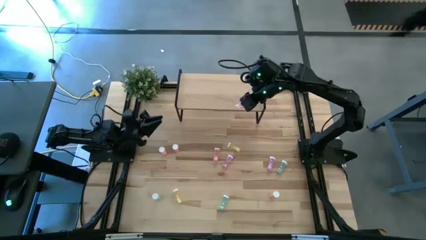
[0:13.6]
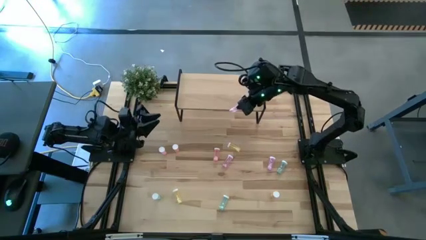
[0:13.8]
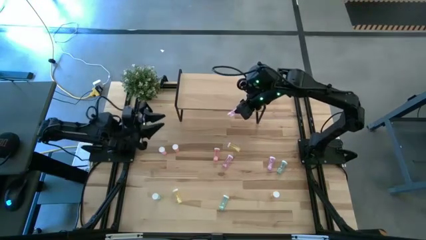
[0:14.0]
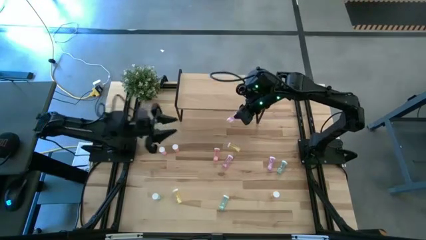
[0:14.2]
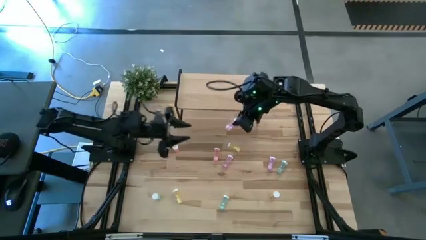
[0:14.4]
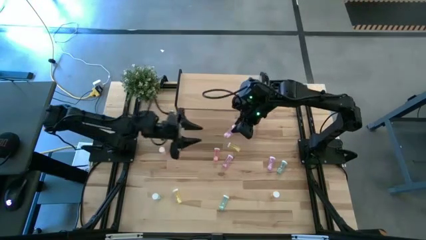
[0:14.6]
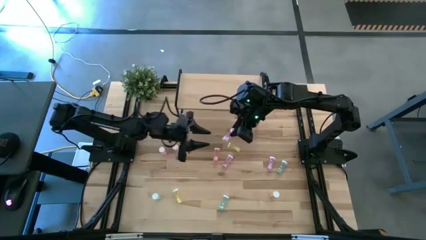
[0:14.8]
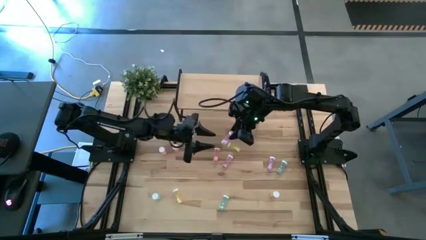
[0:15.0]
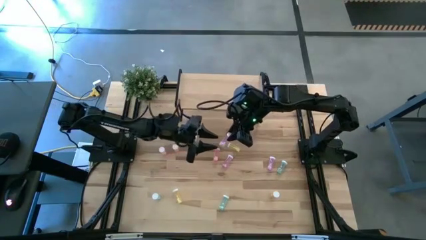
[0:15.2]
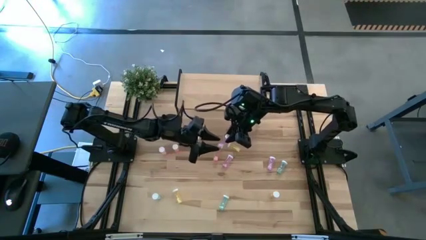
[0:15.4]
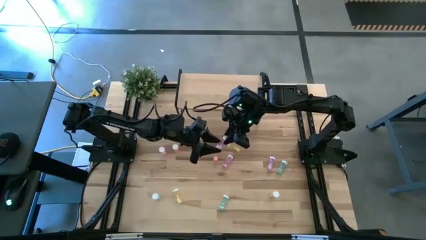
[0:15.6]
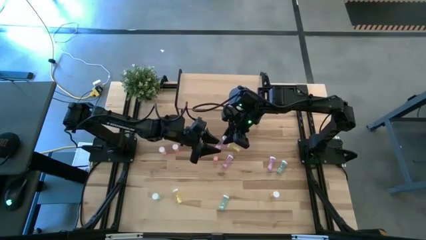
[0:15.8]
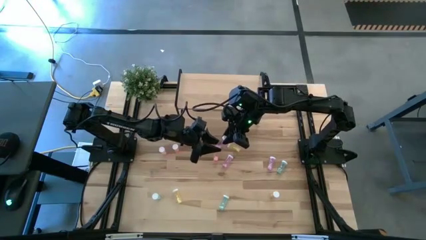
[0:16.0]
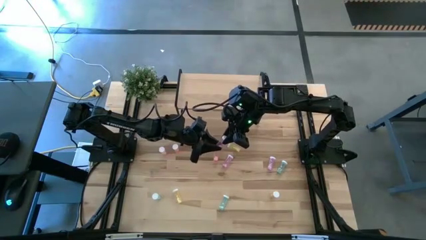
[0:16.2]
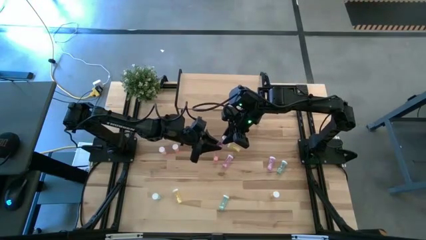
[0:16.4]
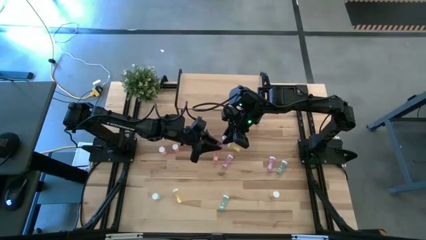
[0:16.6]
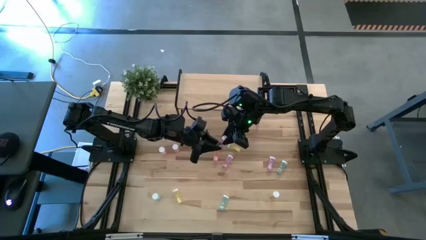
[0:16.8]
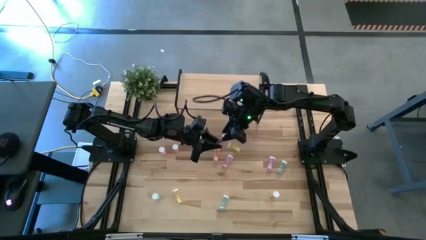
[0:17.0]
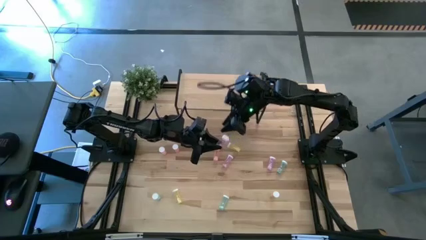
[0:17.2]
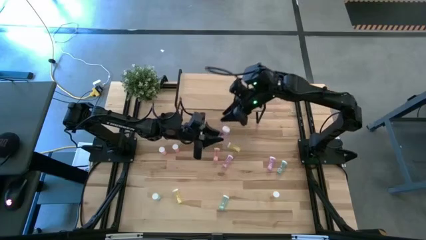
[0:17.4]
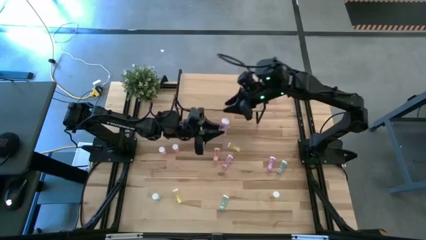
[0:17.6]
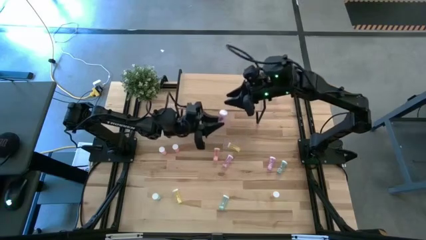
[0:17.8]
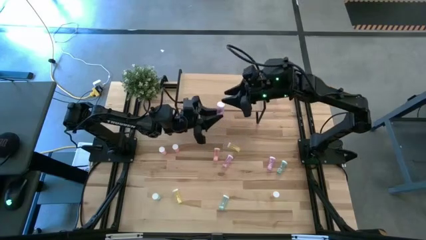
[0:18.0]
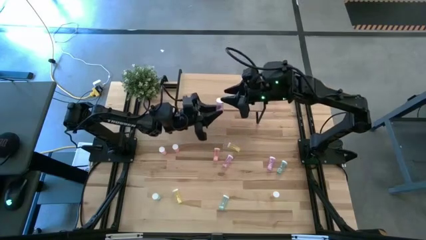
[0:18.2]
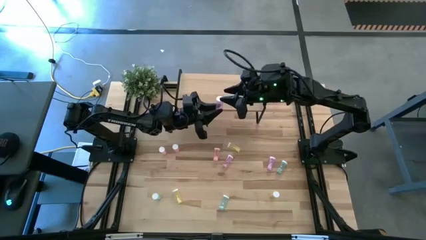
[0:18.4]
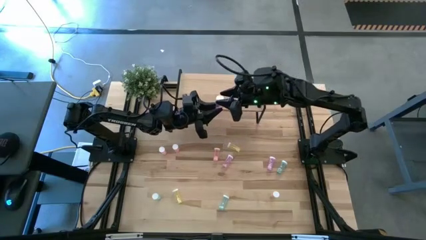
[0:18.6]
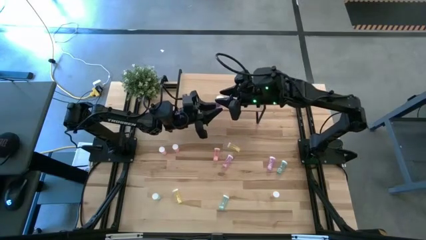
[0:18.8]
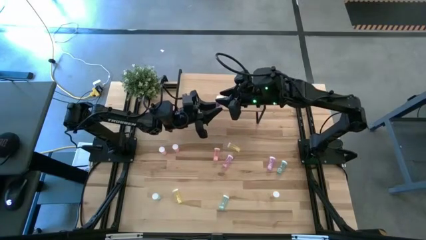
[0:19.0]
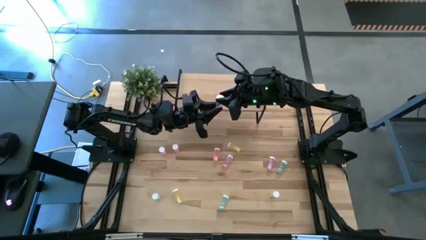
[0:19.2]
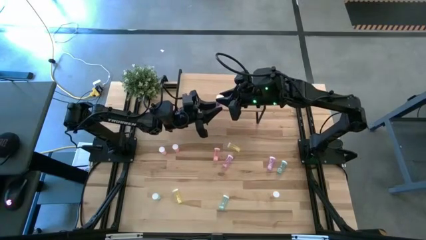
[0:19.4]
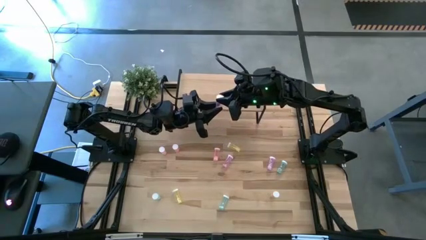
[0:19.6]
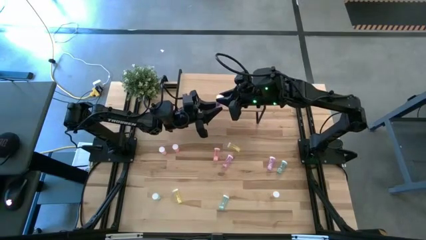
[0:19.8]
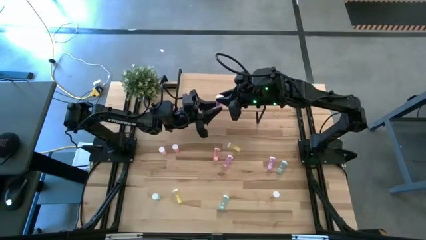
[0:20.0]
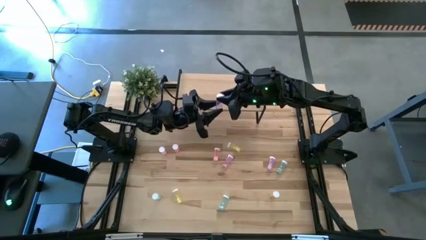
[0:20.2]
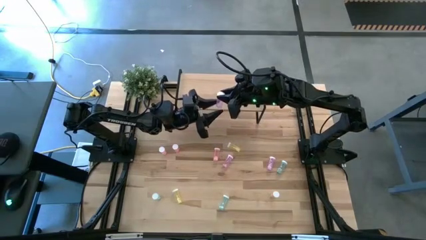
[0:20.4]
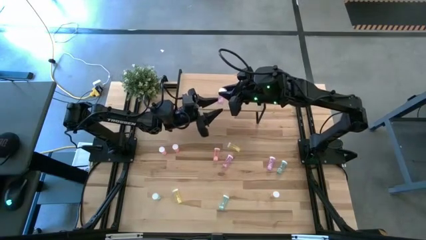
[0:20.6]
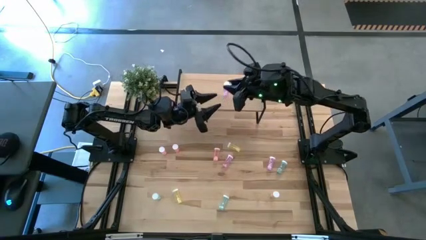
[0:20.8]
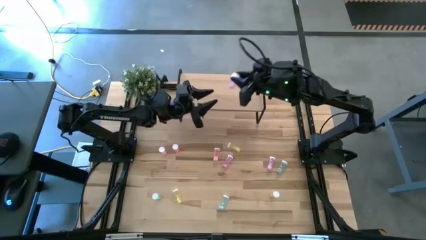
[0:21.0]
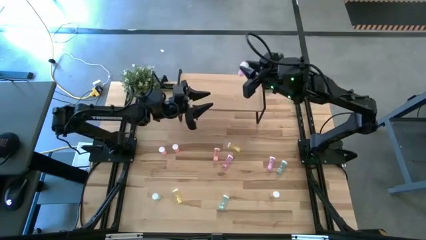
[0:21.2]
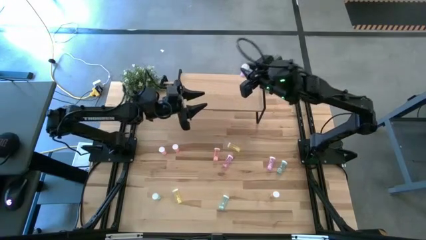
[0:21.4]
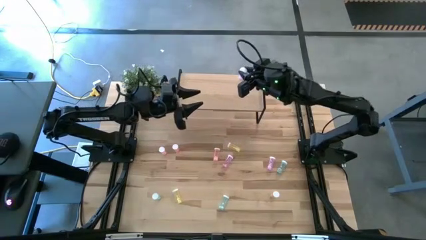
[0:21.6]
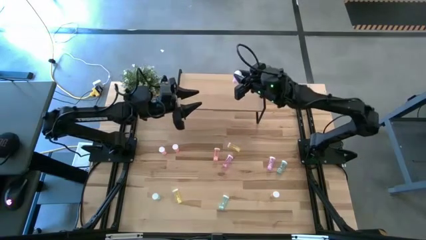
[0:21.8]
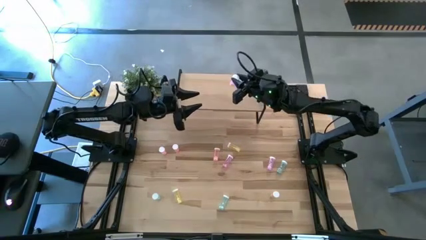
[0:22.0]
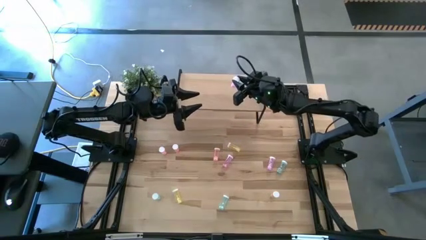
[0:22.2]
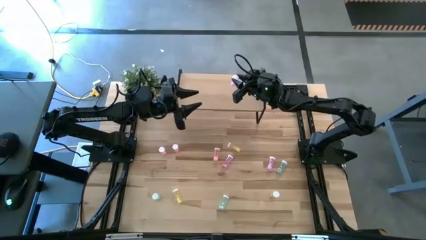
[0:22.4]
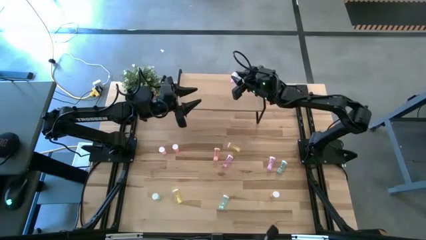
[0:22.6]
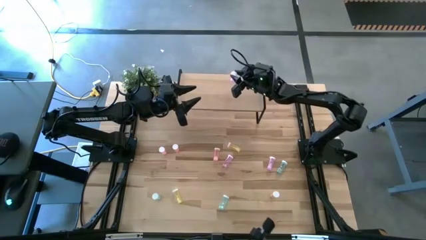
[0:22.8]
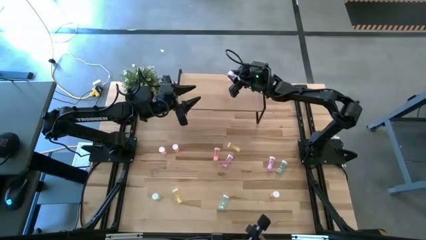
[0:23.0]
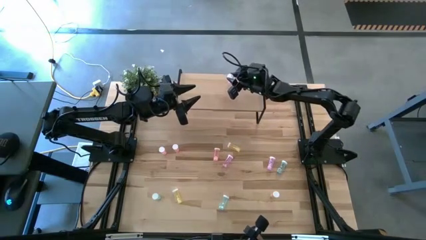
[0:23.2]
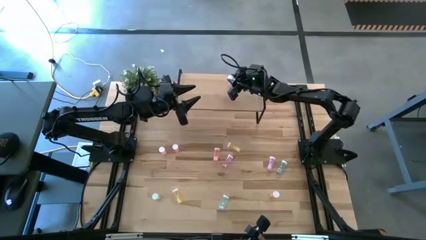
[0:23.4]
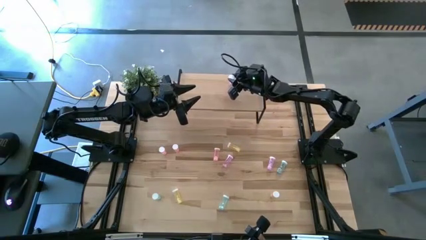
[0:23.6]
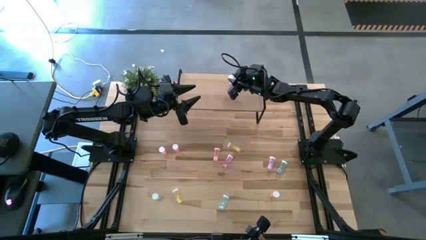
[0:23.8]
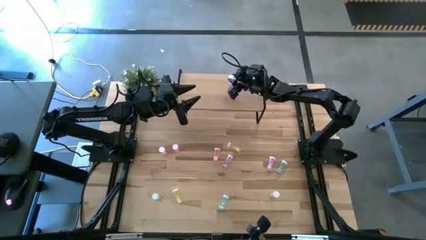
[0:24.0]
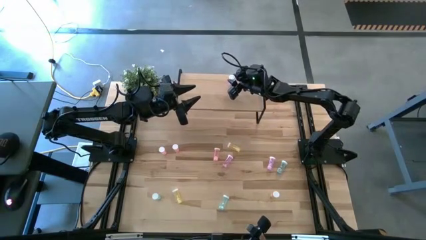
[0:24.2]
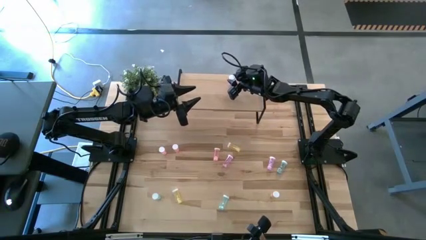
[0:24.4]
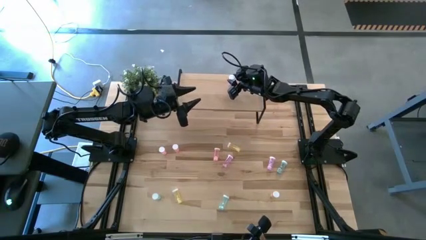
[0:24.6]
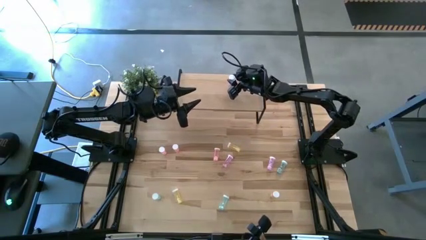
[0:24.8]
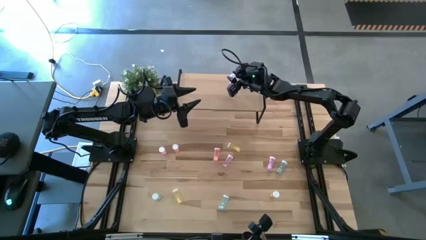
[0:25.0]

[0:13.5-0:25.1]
Task: Pick and place medicine bottles onto shelf by color
Put the top right purple pill bottle on the shelf

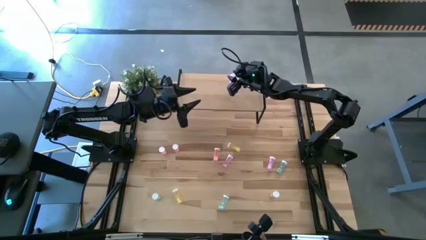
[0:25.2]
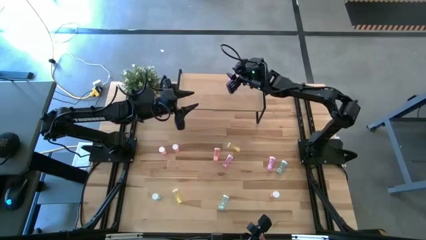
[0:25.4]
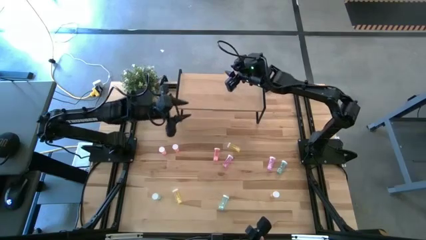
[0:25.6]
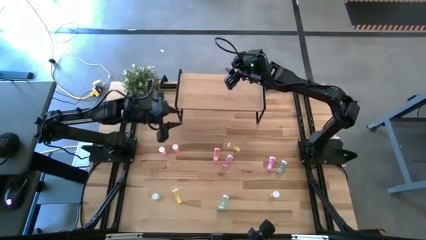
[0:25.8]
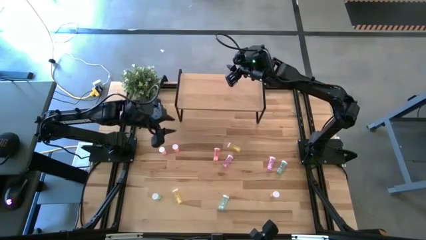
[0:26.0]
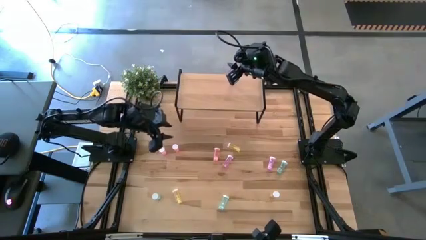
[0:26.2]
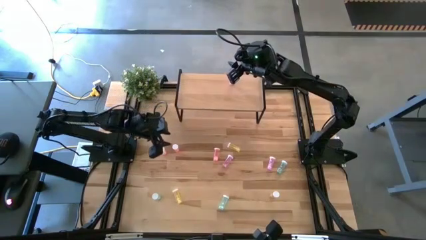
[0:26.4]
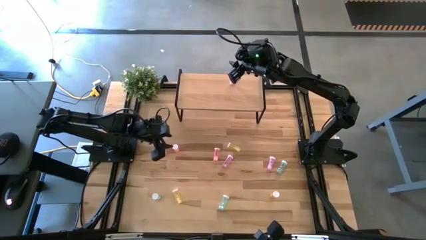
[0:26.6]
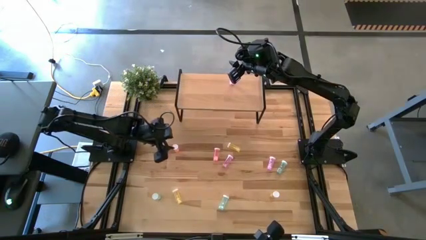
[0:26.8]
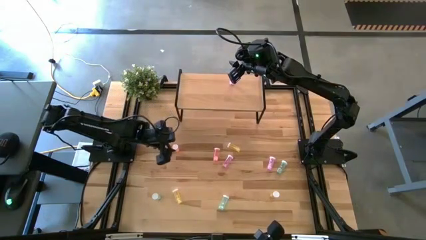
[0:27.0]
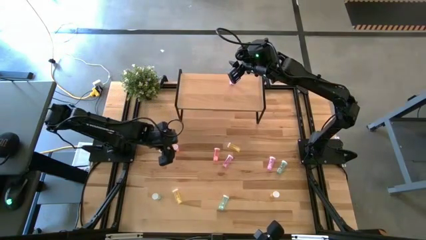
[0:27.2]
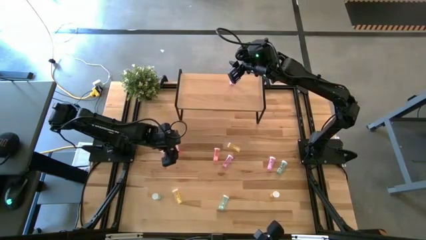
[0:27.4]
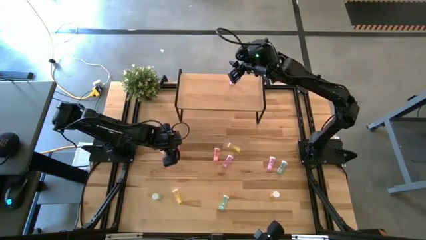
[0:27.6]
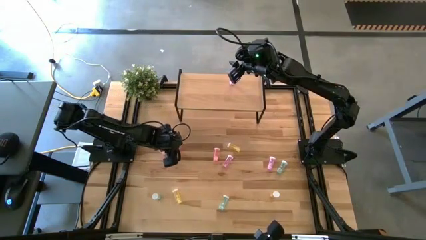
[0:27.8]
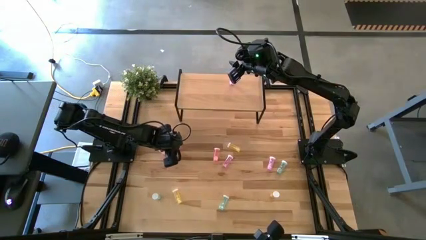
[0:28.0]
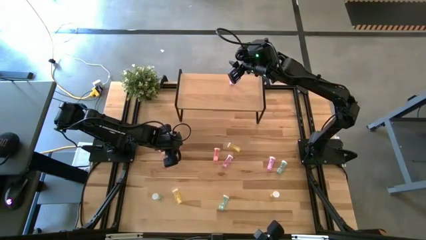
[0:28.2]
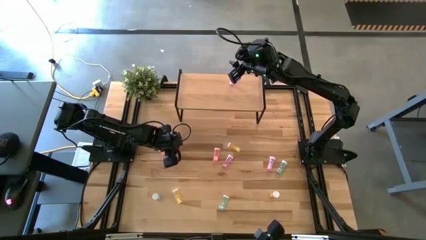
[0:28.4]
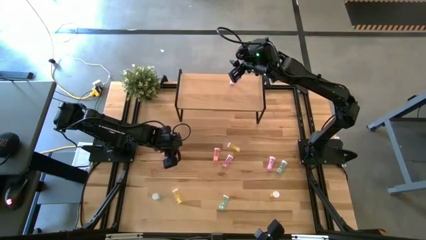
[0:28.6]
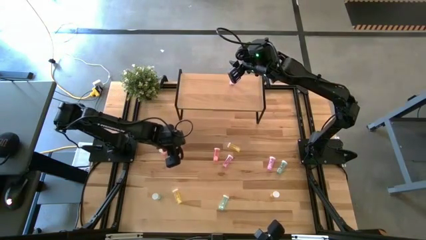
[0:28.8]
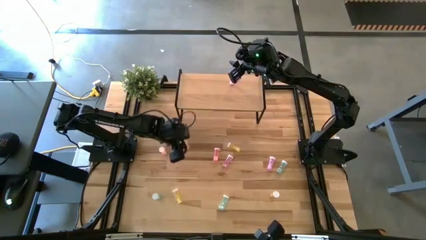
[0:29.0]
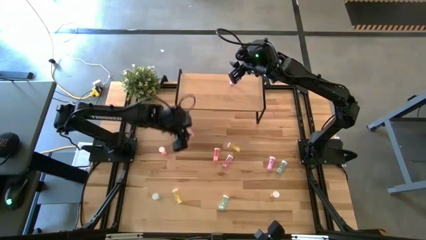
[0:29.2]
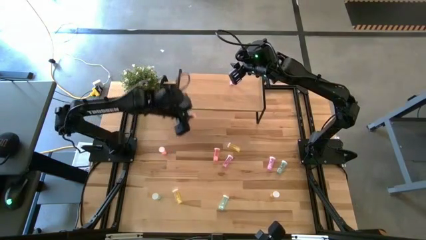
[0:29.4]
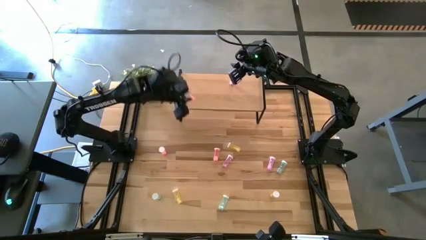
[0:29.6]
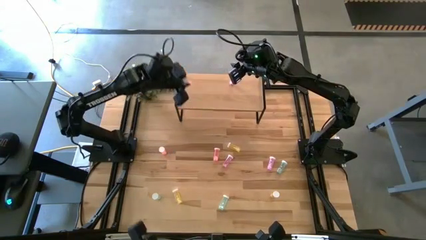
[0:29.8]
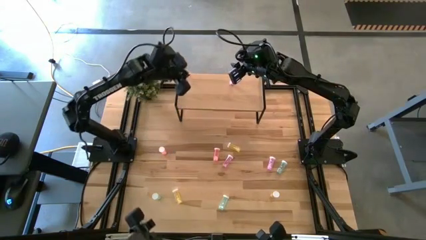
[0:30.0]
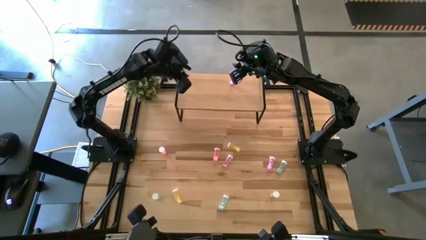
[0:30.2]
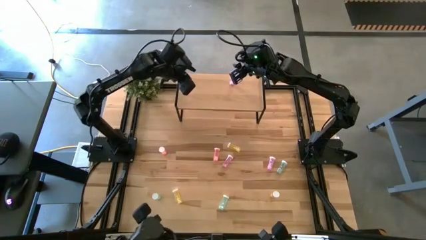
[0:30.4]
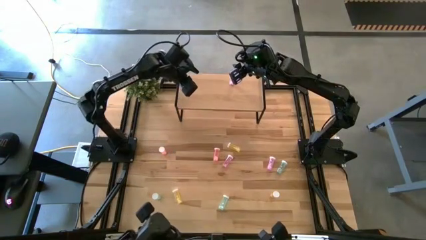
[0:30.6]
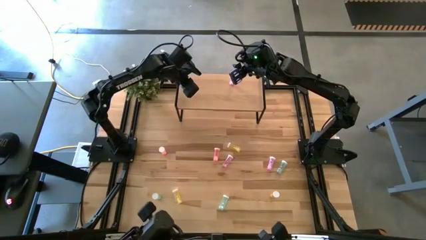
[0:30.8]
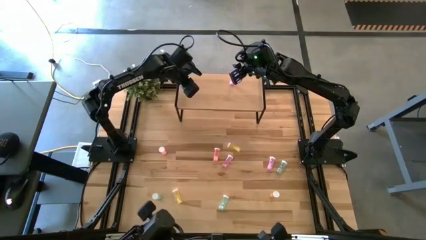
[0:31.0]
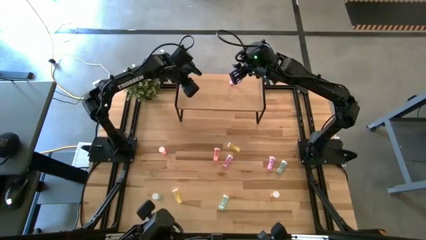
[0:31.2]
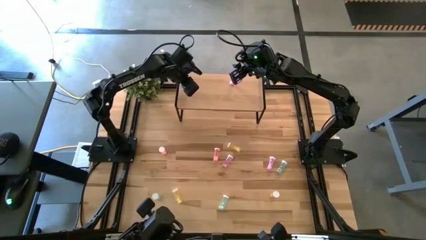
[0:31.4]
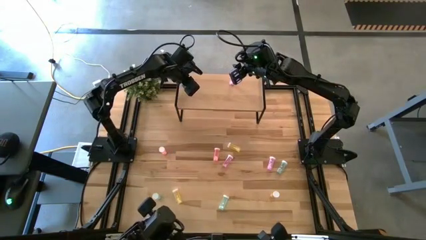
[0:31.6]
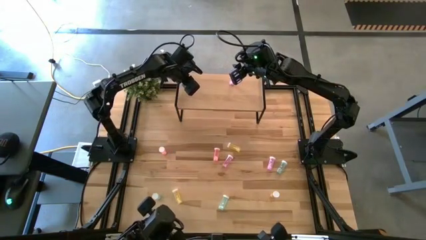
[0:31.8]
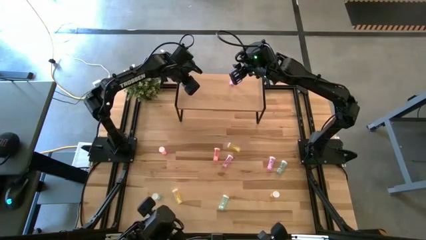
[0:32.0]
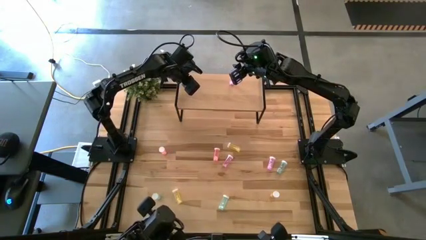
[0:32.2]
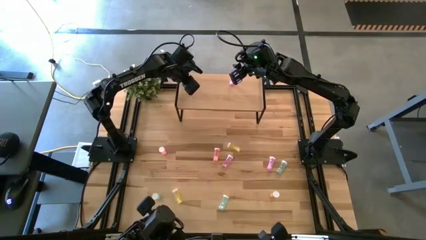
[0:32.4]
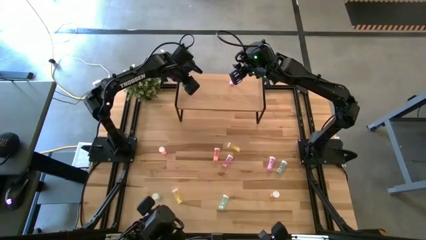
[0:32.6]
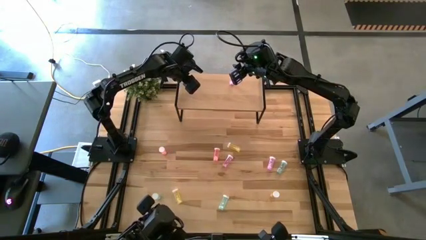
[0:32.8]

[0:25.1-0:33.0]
Put the top right pink pill bottle on the shelf
